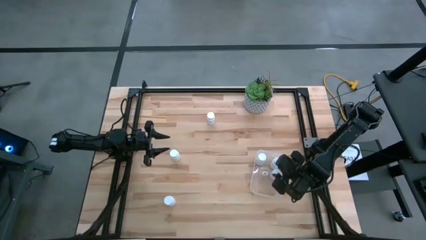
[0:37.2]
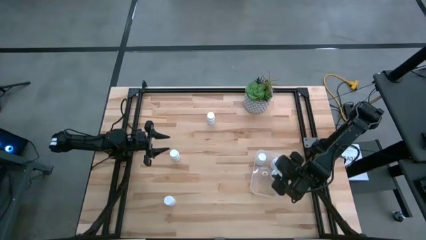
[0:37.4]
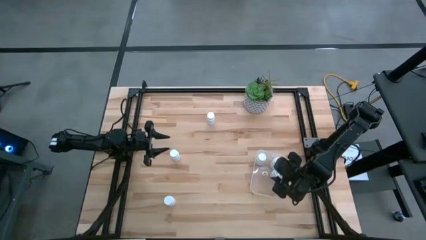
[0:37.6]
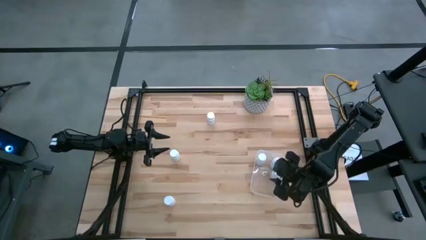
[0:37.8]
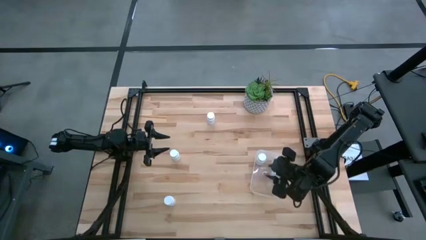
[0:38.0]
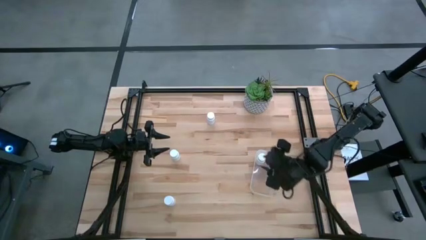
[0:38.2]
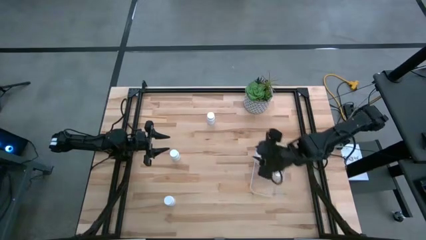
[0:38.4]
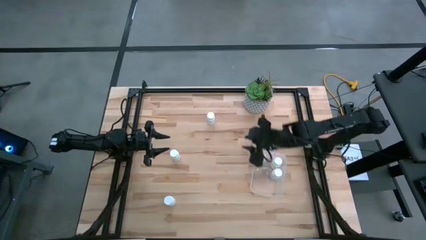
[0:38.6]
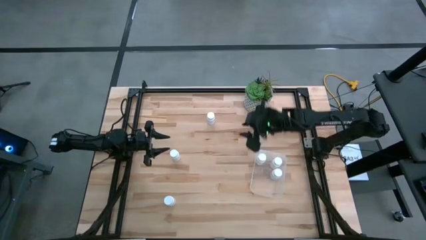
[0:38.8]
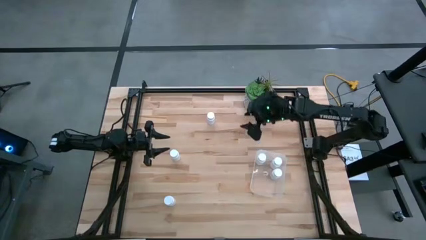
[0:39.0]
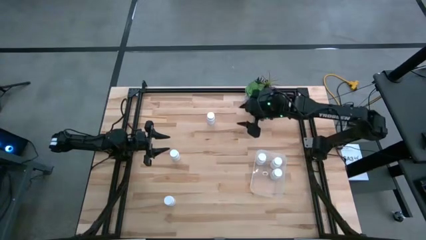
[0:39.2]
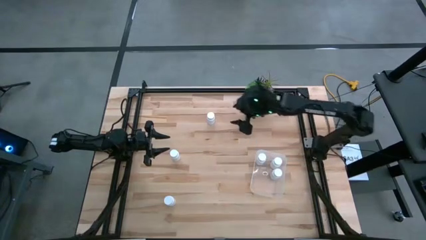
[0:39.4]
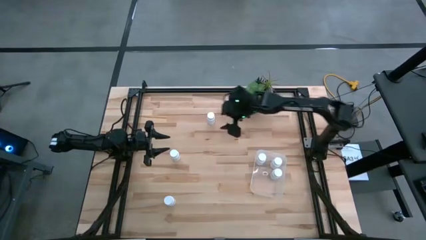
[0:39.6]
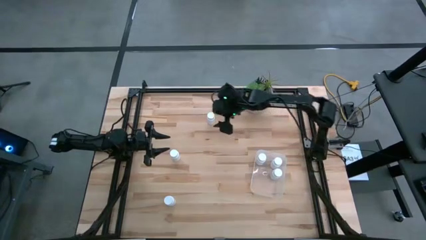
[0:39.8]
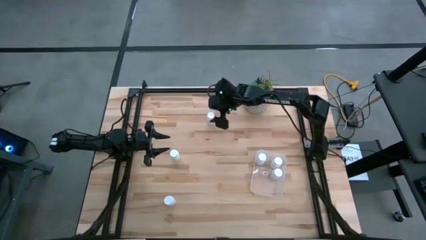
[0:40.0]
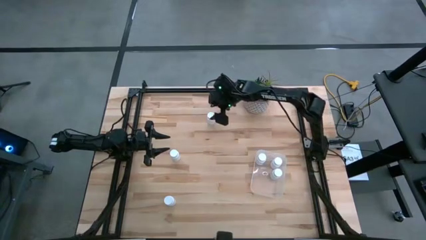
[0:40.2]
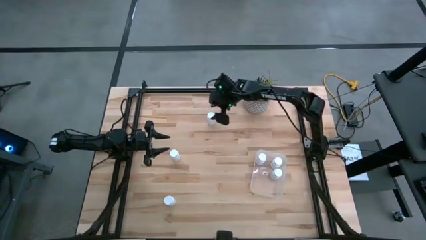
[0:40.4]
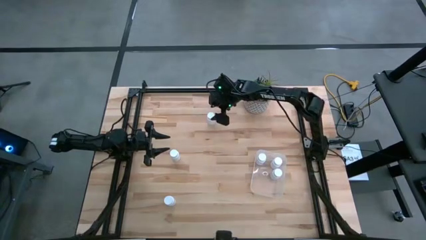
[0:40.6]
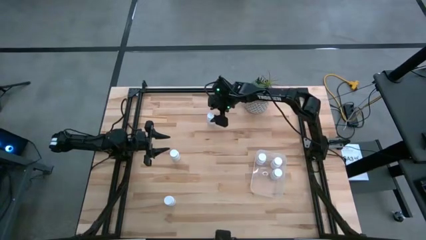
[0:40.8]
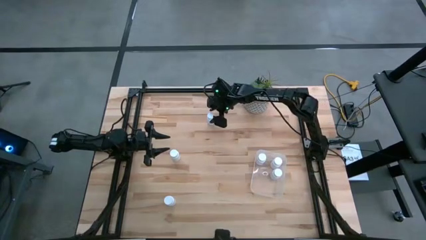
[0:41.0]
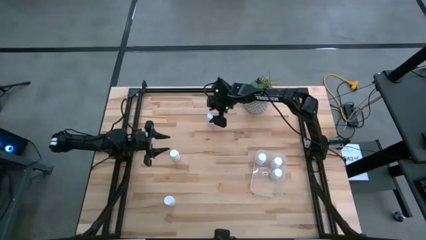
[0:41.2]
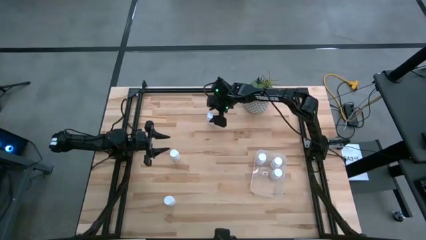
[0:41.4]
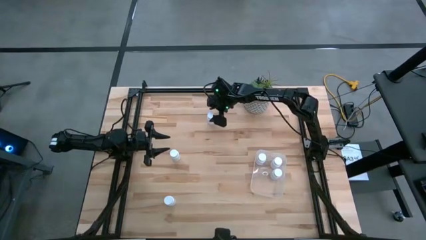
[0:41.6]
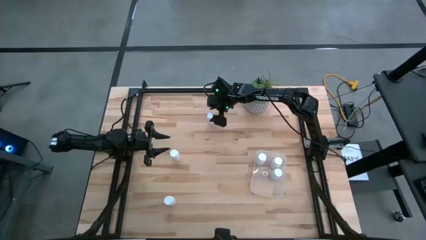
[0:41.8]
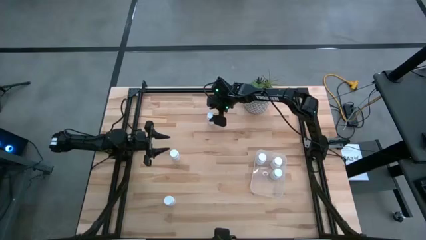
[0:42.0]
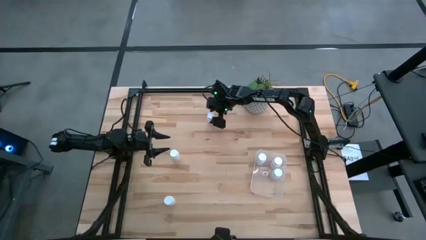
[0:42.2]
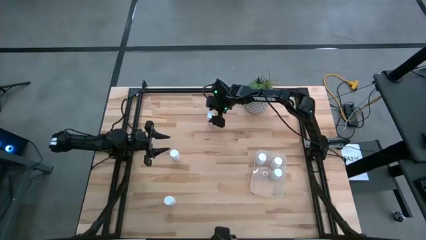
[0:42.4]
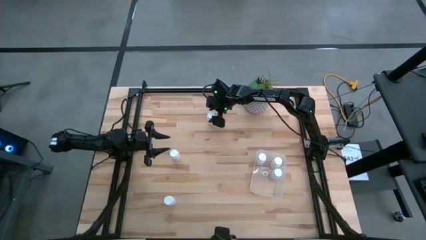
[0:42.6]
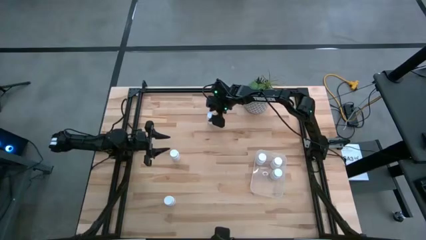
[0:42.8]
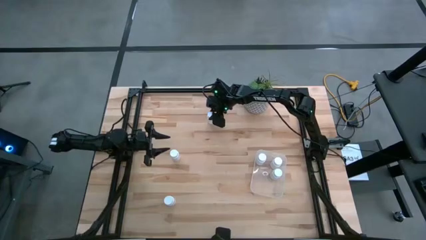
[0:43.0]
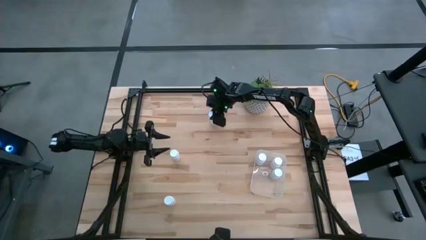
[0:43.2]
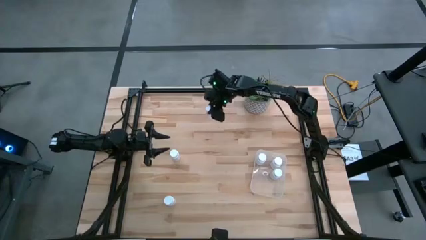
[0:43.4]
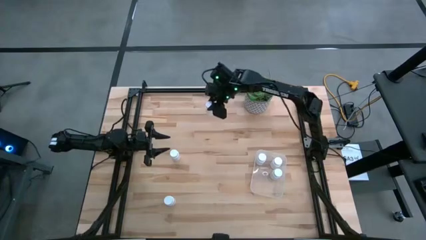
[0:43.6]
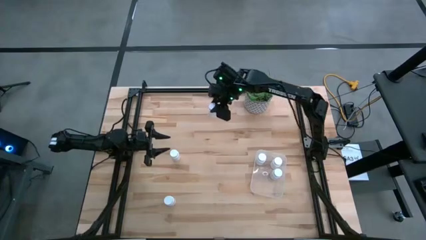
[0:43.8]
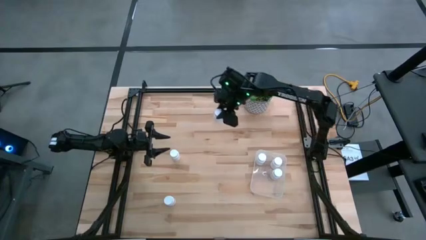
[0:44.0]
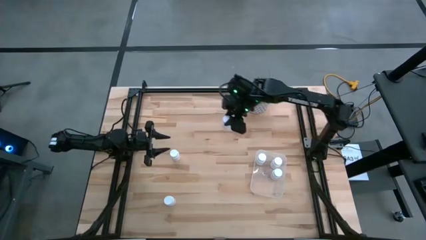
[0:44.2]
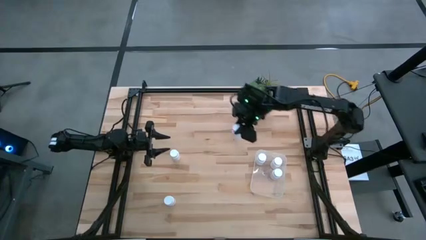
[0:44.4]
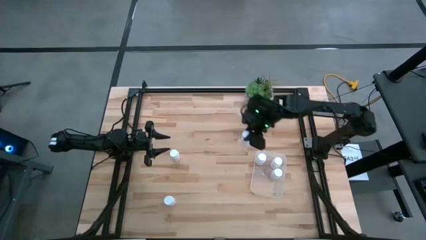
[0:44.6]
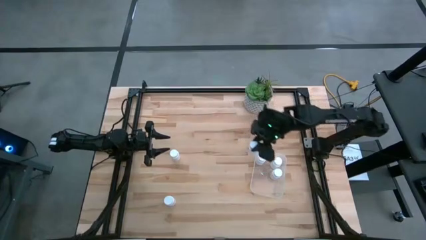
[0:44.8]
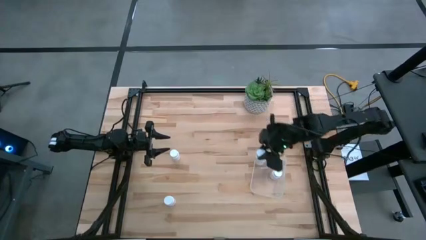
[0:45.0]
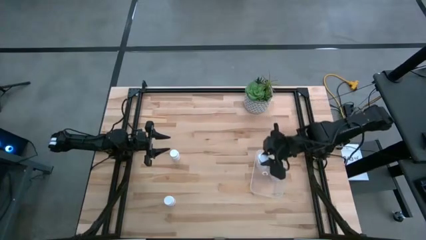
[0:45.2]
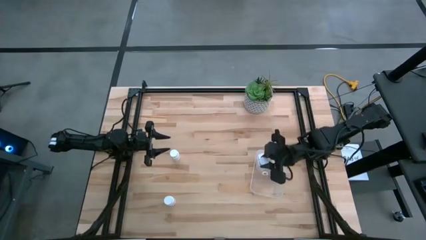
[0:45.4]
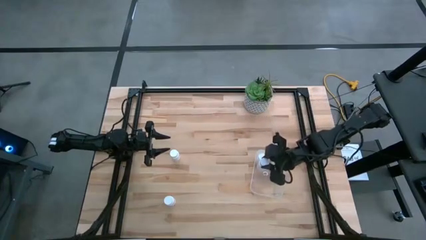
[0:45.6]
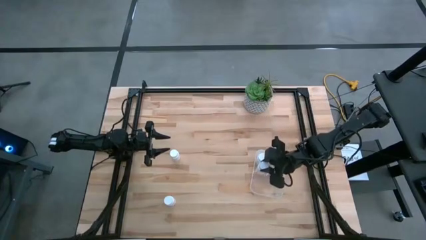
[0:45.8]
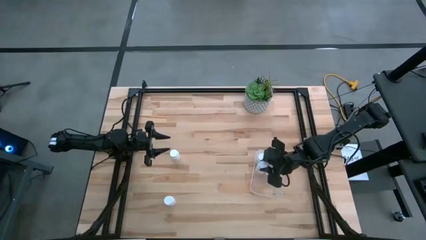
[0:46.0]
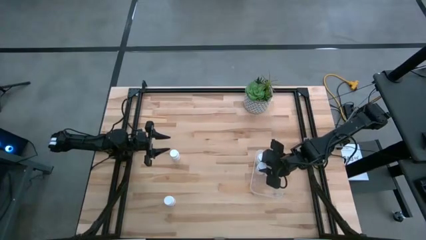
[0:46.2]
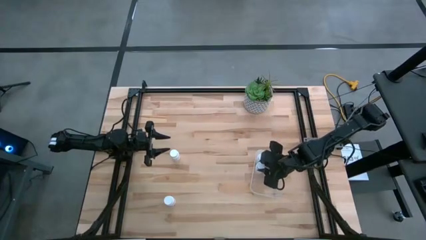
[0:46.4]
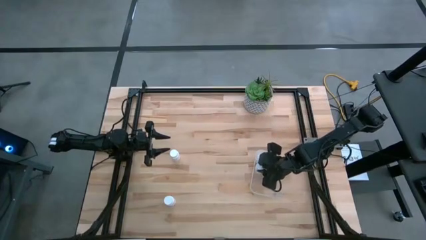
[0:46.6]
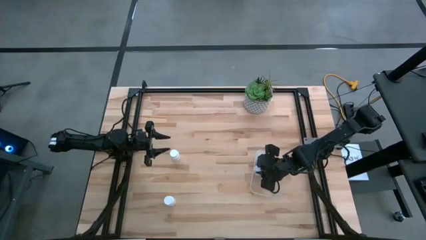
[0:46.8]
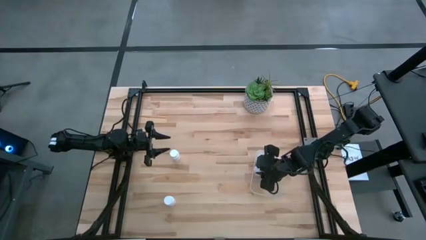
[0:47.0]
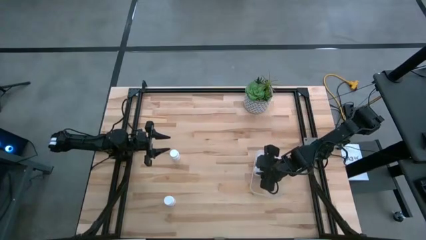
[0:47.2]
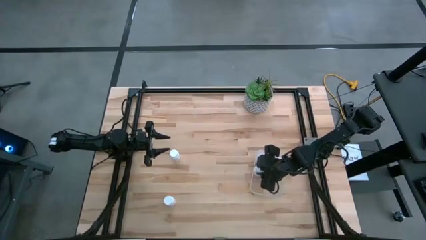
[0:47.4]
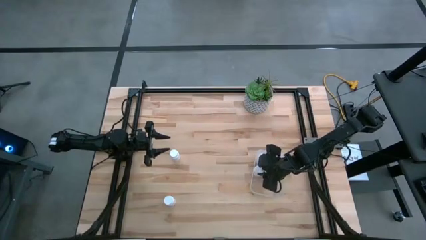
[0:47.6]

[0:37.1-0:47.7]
Task: Pick and place pill bottles into a basket
Put the white medicine bottle into the transparent bin
